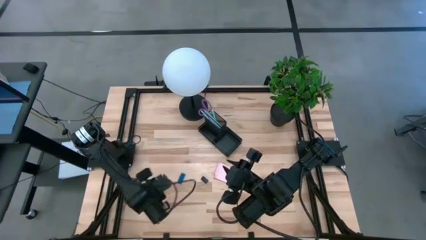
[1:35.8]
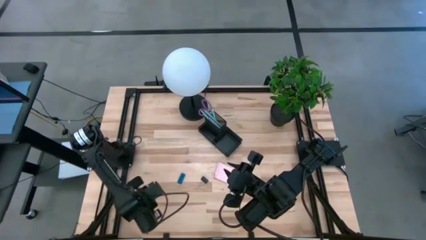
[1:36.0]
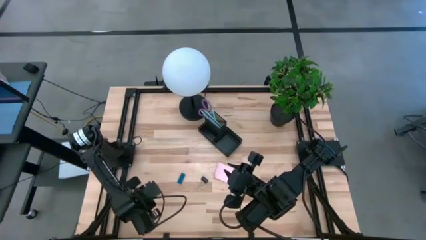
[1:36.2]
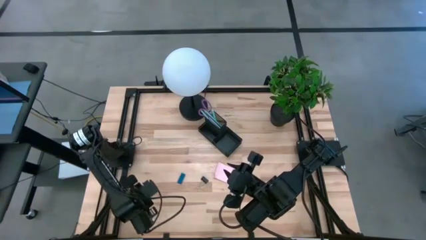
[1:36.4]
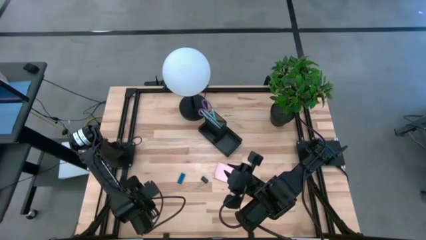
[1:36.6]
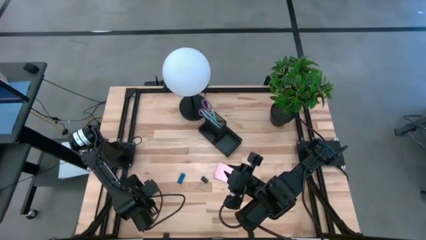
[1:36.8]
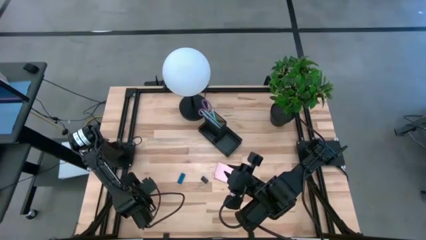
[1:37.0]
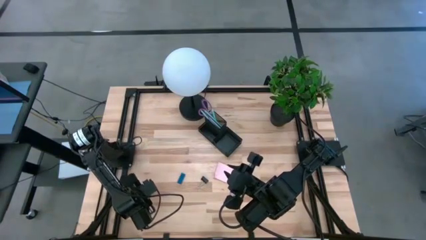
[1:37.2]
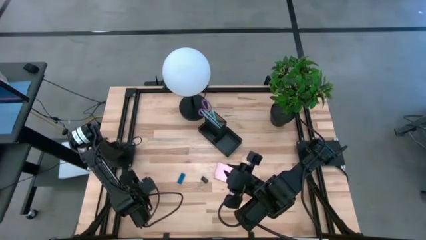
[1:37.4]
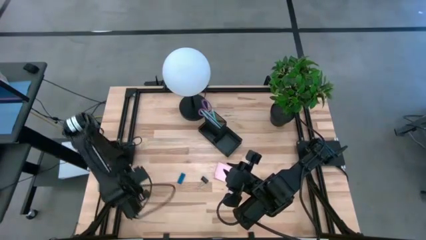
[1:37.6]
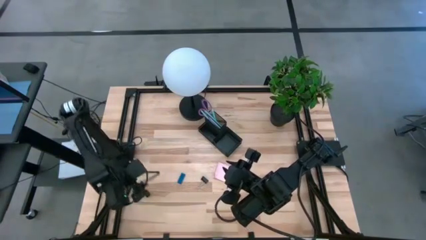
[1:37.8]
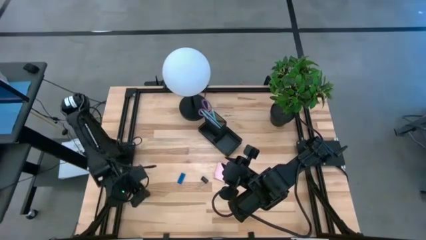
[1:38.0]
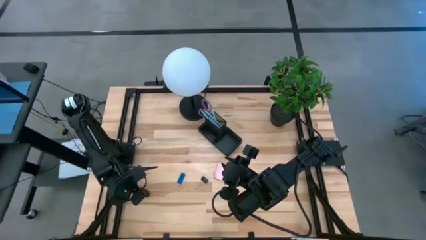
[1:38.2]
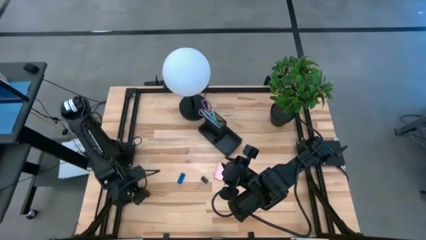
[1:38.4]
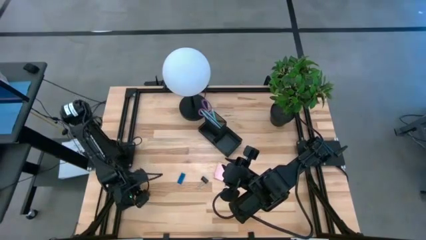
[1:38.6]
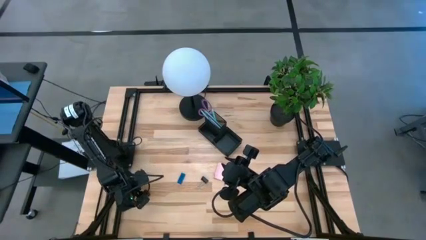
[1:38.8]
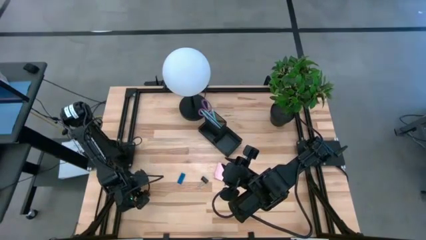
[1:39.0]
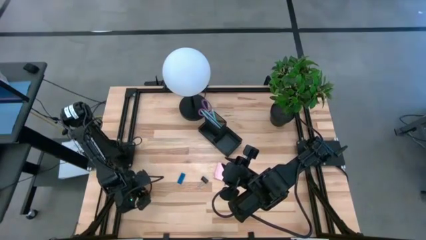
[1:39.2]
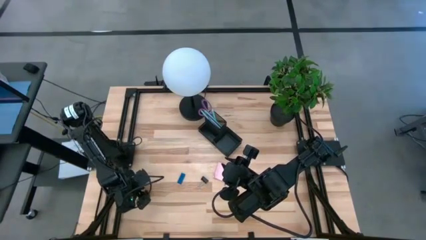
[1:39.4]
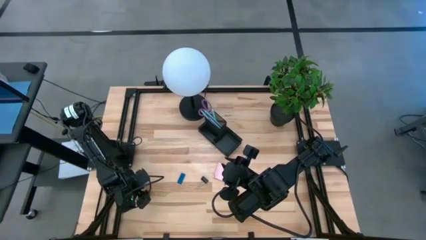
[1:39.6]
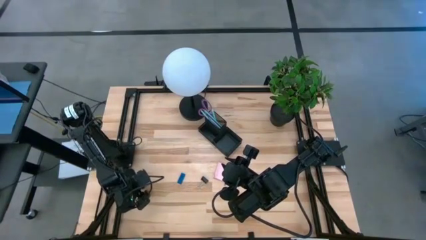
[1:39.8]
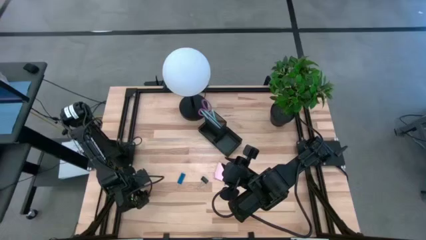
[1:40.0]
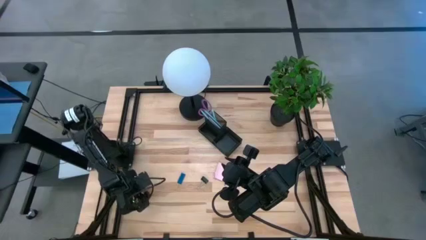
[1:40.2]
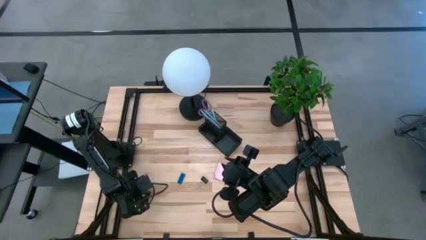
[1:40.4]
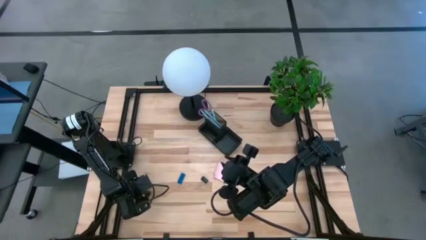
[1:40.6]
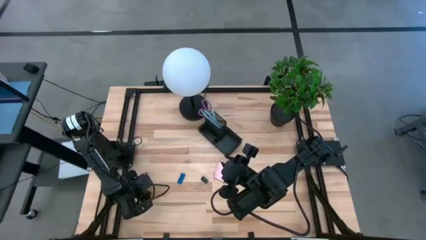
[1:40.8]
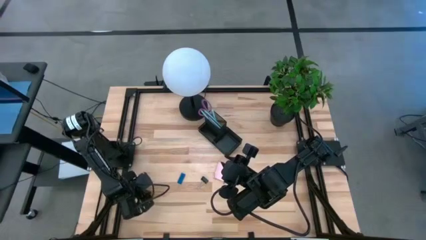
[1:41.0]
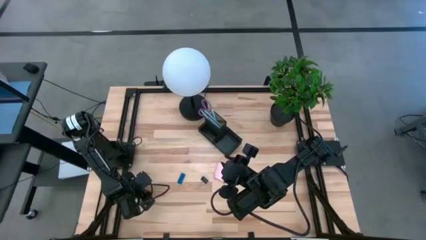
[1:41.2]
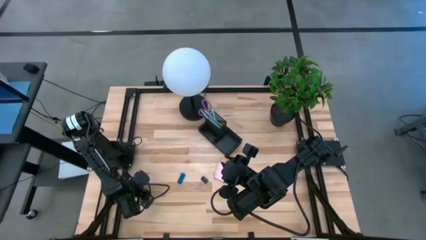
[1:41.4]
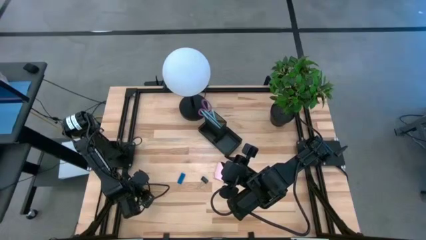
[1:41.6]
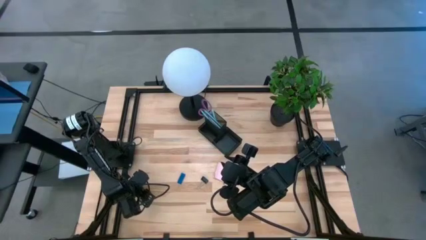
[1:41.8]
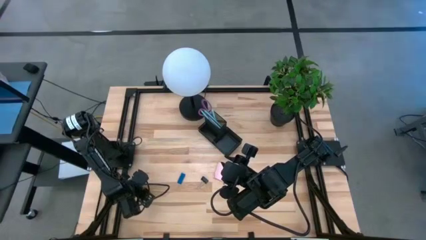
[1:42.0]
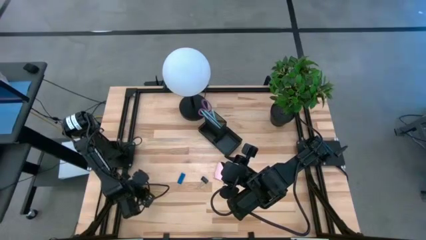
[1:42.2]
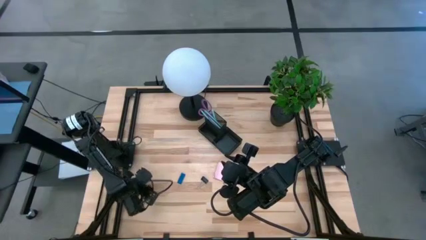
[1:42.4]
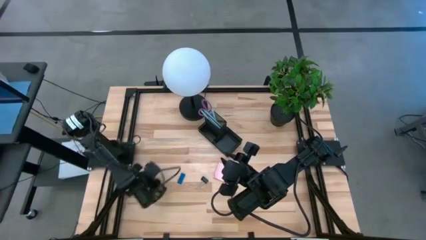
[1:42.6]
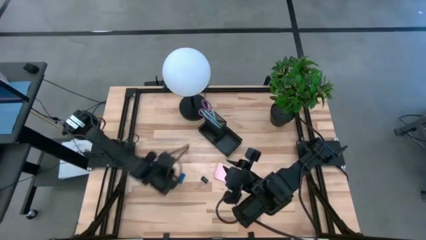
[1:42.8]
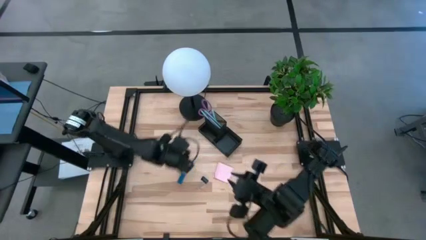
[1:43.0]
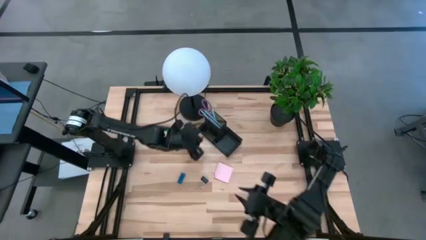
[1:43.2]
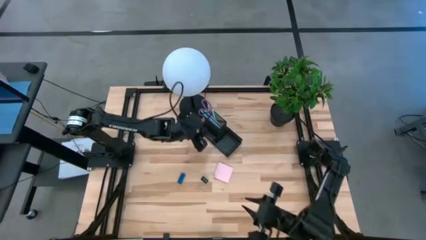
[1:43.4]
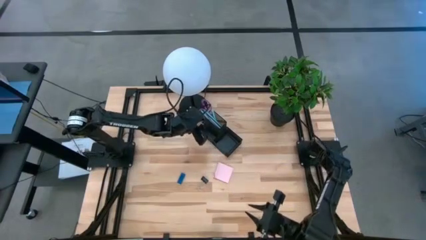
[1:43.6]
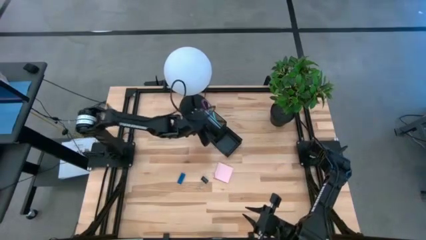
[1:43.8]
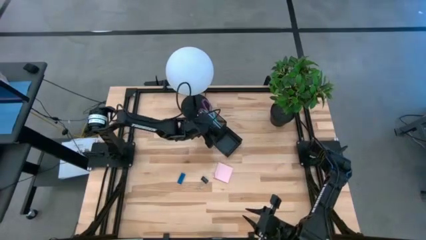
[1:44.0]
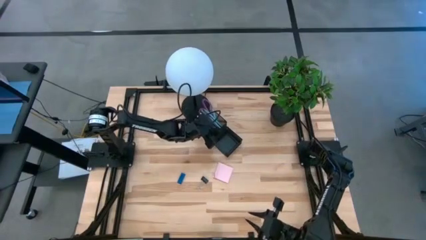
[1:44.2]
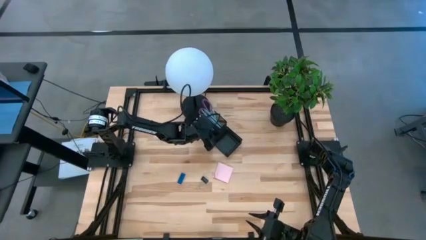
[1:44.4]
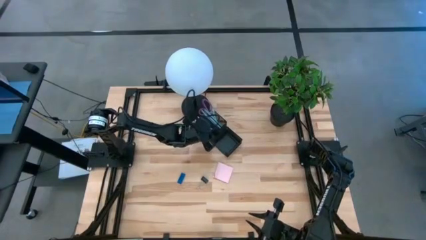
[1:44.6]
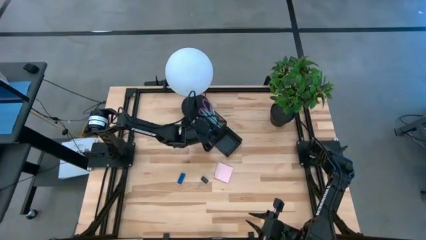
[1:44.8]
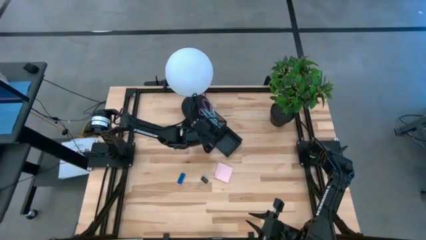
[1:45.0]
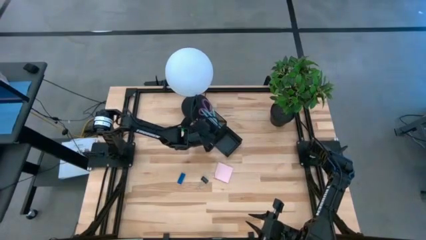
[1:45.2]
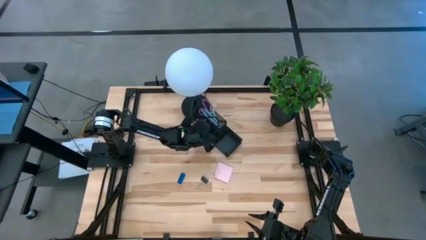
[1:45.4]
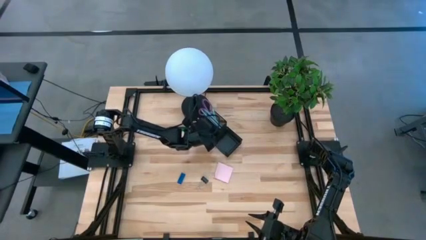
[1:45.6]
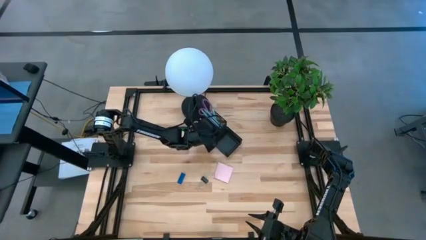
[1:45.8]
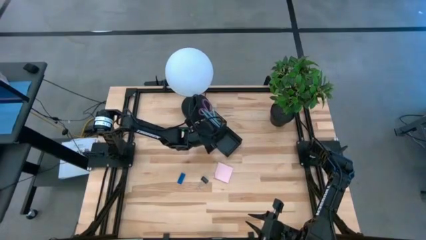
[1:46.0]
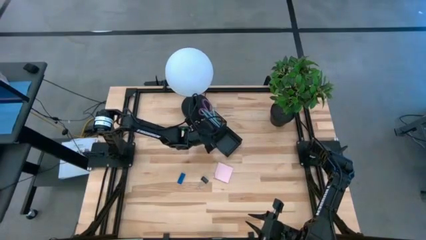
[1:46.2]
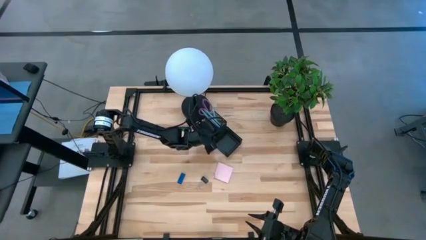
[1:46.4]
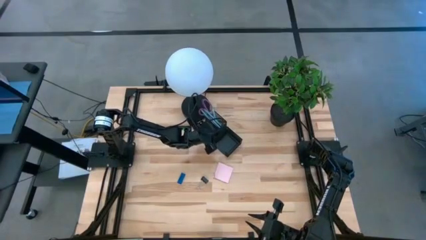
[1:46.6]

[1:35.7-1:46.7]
Task: Pick and place office supplies into organizer
Put the left black binder clip into the desk organizer

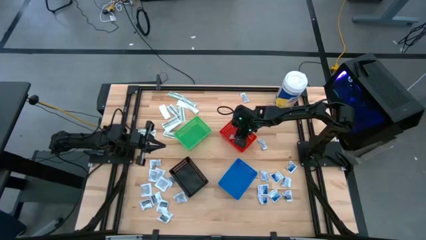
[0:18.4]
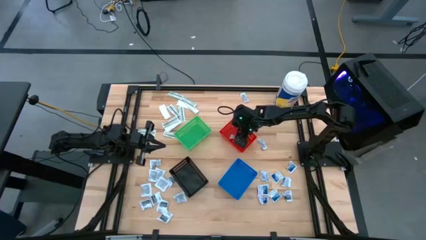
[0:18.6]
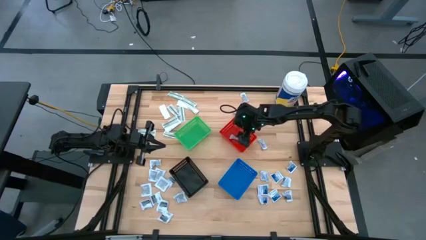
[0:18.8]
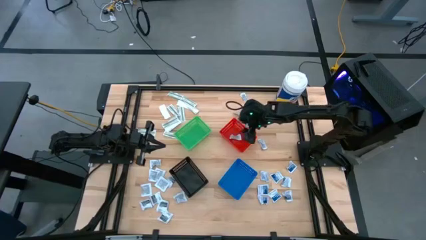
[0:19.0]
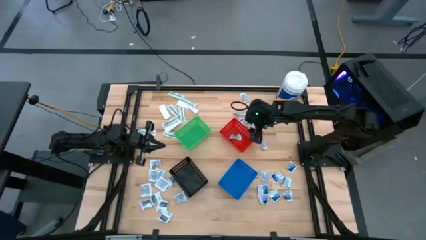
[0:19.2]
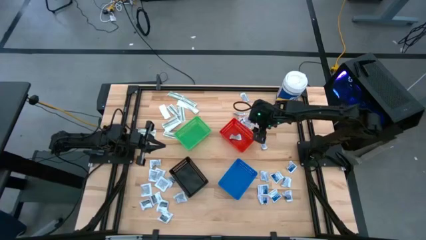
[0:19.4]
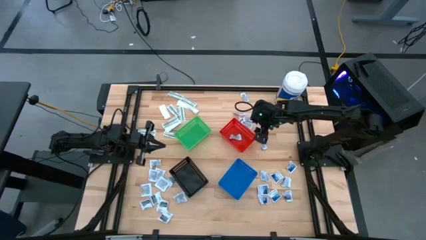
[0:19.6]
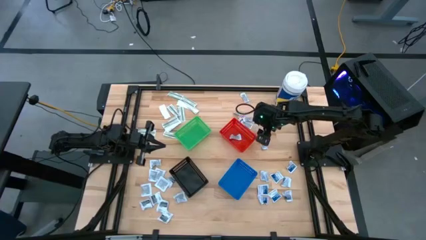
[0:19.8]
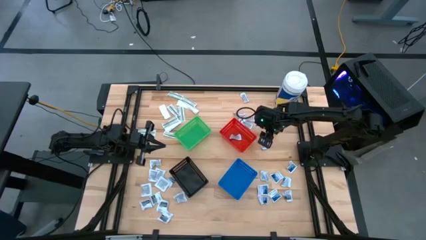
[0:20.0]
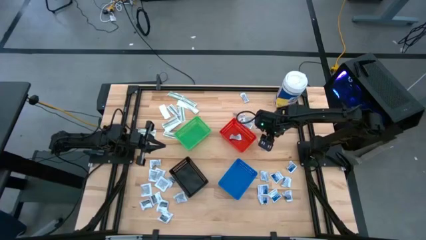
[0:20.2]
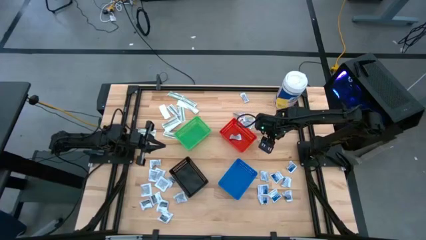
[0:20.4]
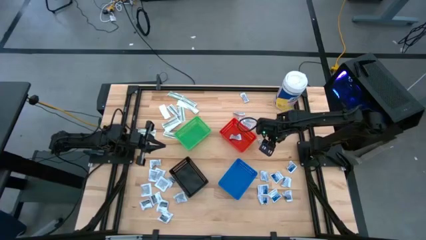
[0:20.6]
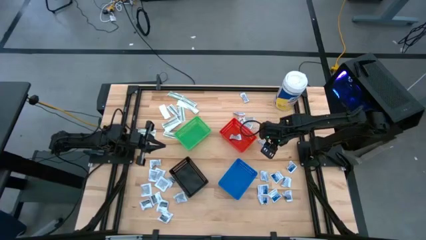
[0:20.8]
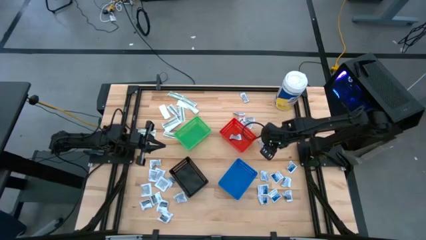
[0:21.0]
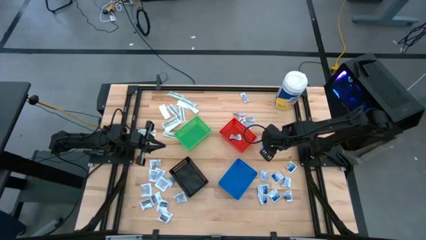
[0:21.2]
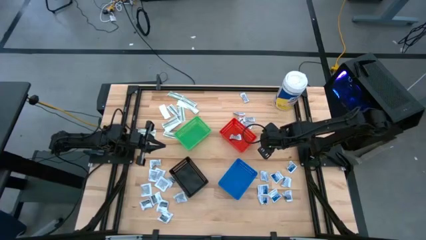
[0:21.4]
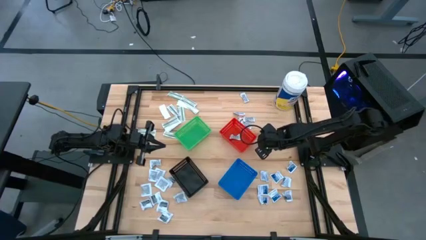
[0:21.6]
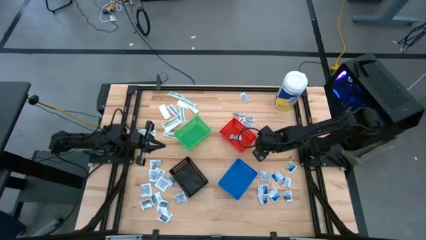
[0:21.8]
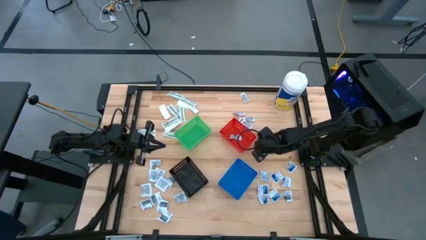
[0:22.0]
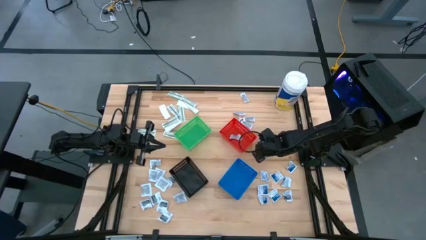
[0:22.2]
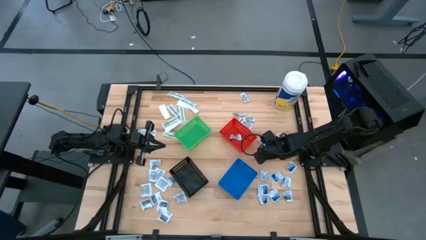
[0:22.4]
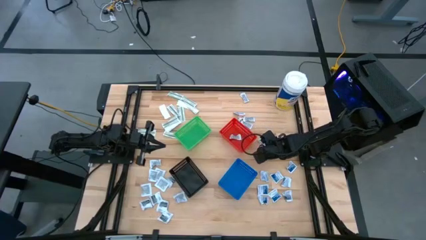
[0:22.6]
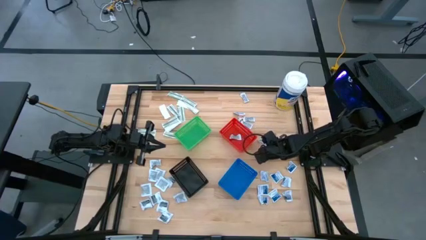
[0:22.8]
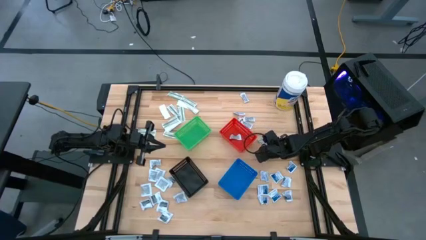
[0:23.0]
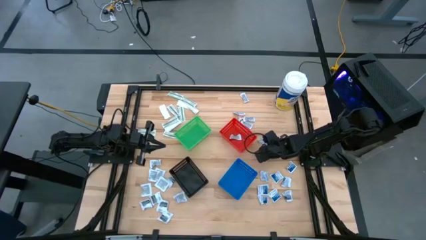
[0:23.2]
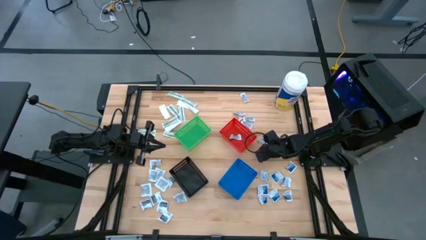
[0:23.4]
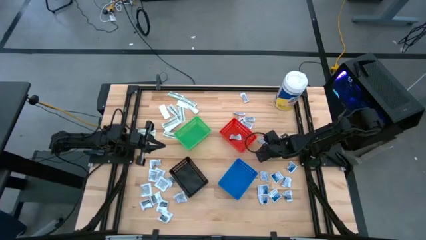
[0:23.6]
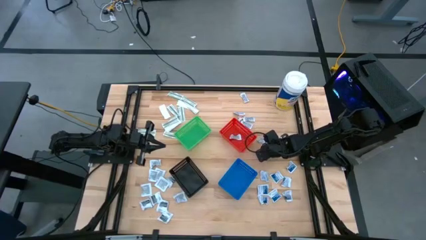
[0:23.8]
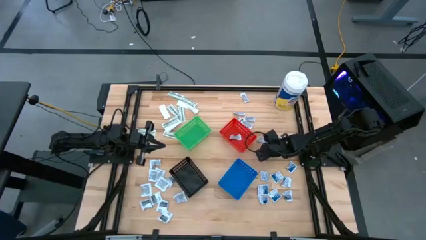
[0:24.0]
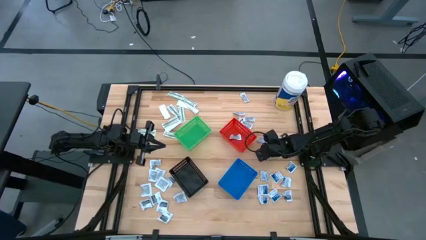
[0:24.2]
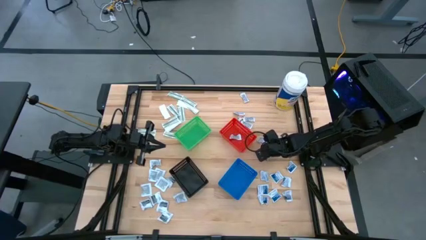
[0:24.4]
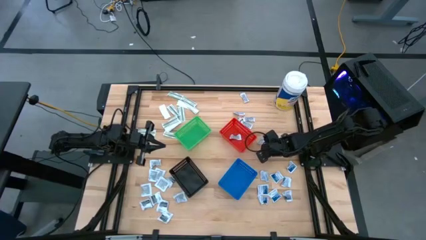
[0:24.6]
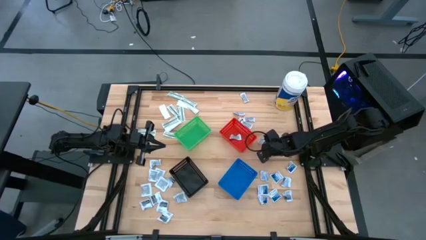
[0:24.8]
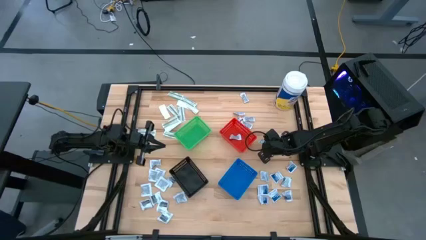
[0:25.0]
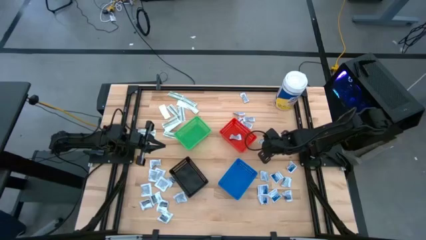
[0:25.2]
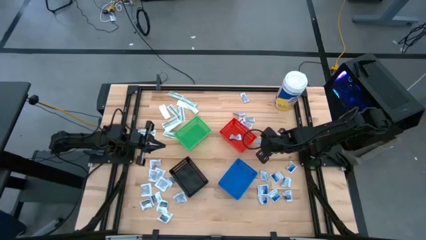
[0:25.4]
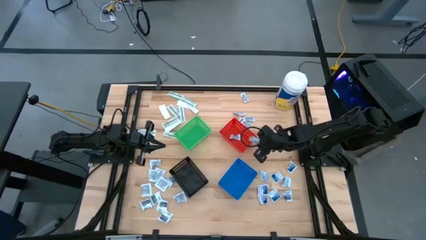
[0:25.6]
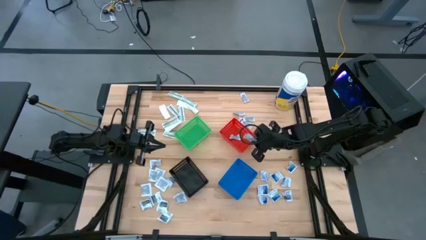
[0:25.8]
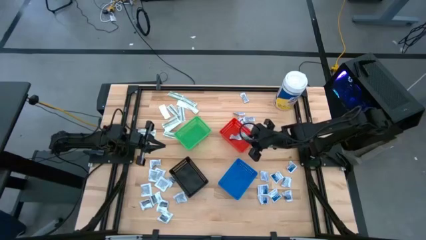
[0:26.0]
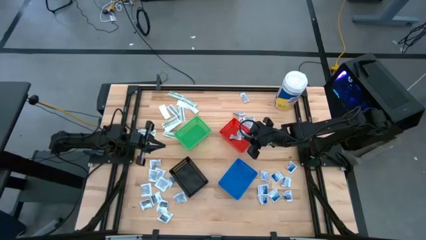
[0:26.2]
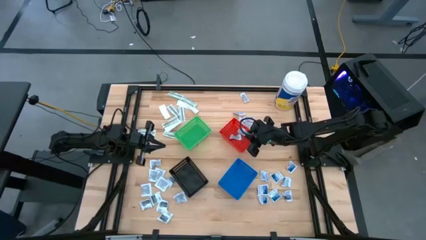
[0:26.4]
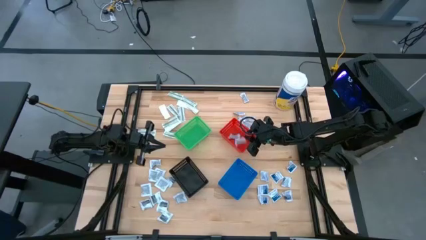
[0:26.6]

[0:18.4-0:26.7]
Task: Pick & Place First Aid Supplies
Put the orange ointment pack into the red bin
